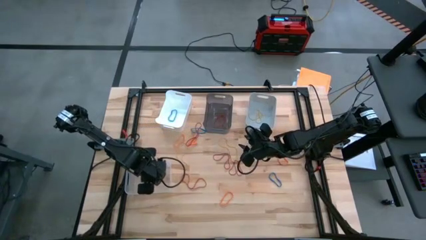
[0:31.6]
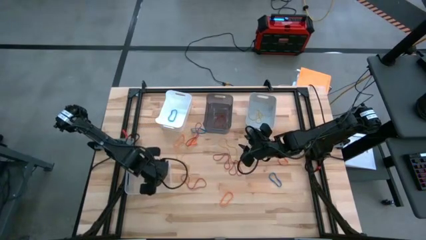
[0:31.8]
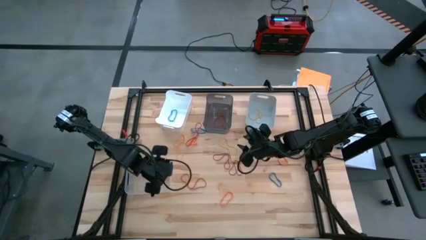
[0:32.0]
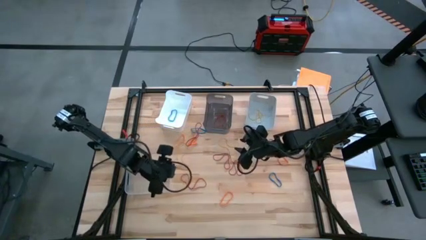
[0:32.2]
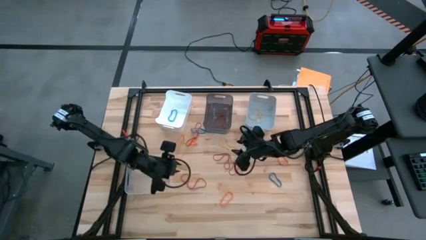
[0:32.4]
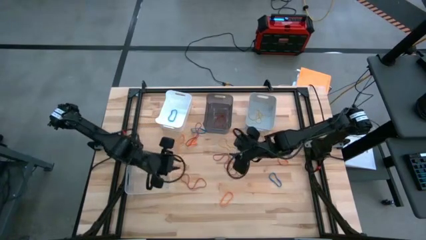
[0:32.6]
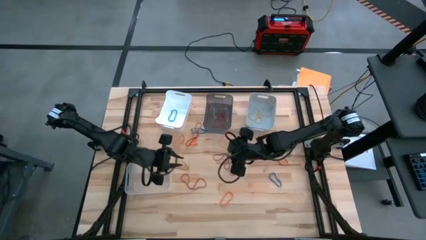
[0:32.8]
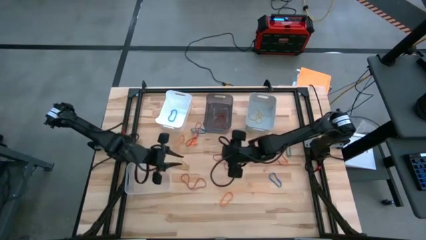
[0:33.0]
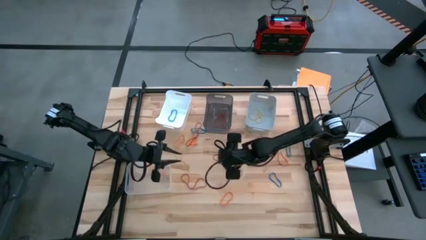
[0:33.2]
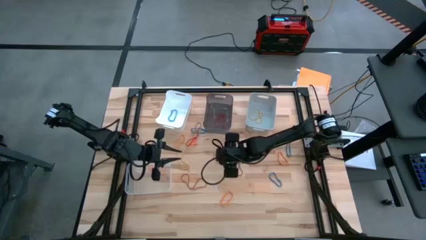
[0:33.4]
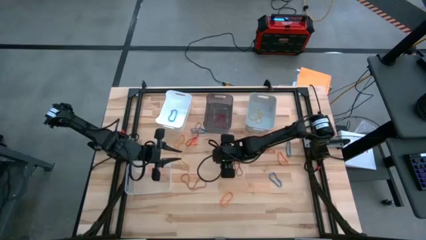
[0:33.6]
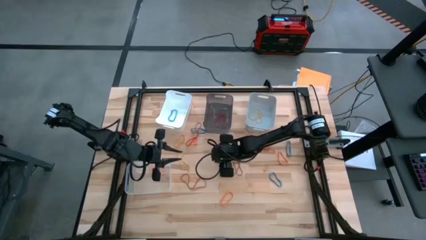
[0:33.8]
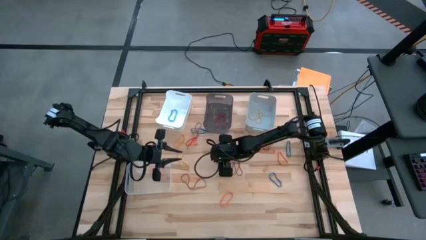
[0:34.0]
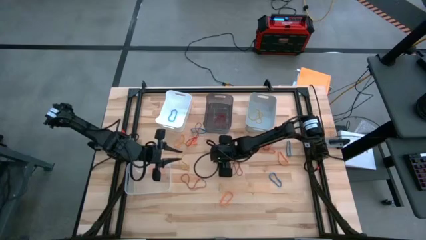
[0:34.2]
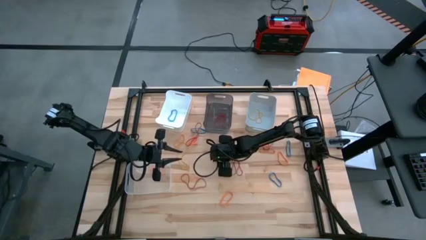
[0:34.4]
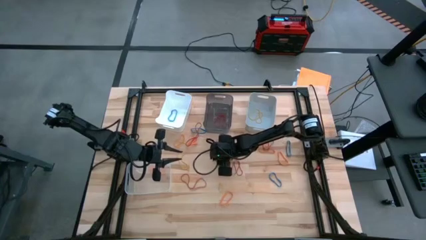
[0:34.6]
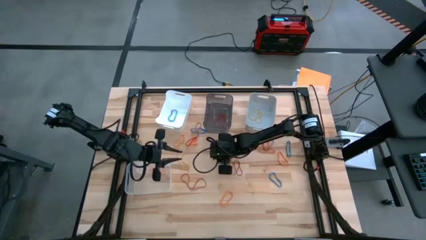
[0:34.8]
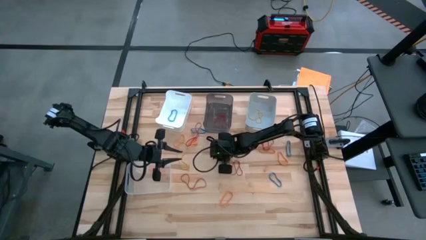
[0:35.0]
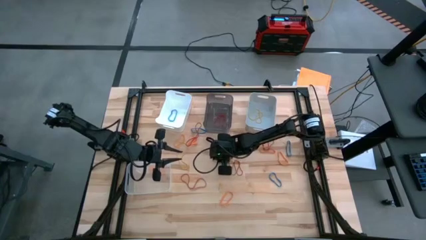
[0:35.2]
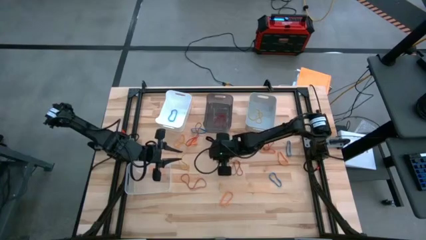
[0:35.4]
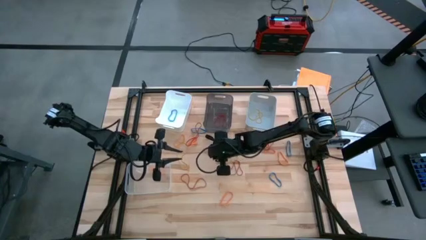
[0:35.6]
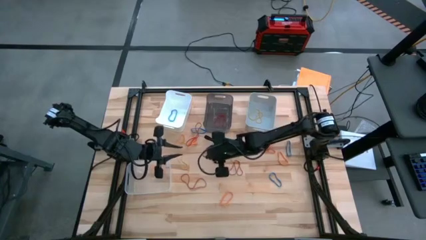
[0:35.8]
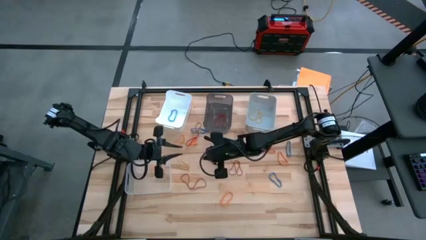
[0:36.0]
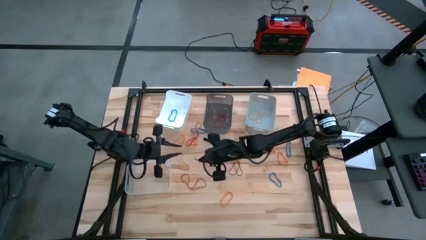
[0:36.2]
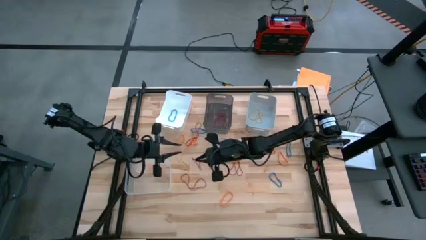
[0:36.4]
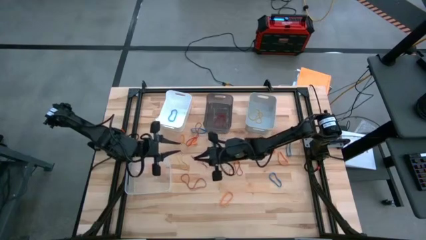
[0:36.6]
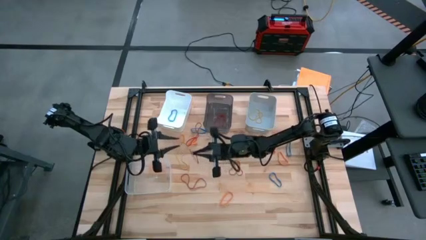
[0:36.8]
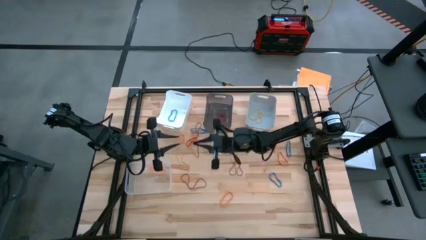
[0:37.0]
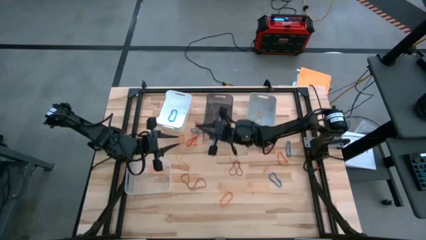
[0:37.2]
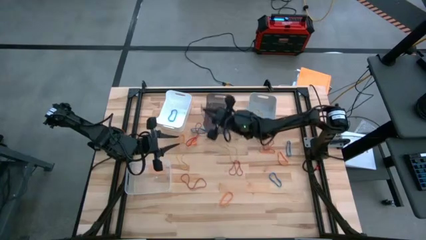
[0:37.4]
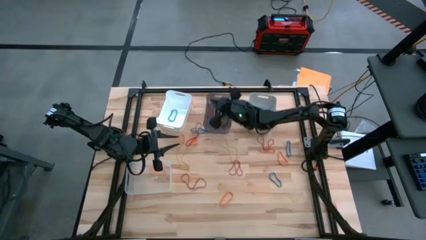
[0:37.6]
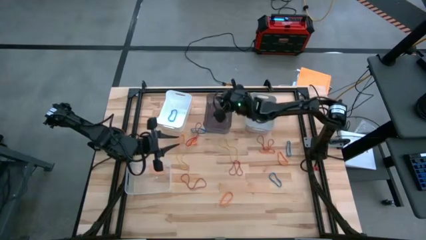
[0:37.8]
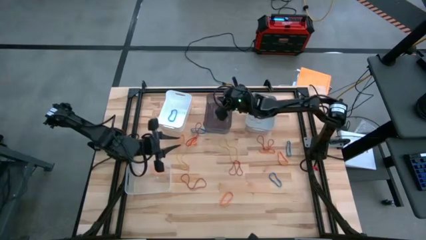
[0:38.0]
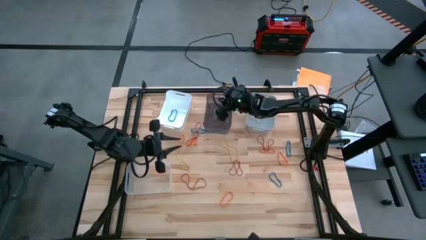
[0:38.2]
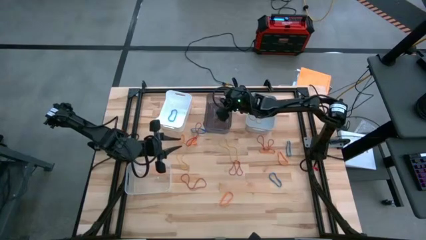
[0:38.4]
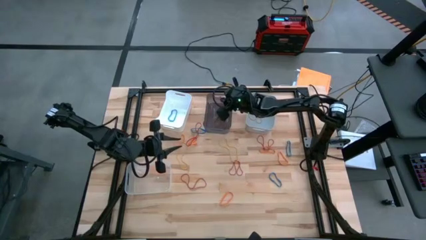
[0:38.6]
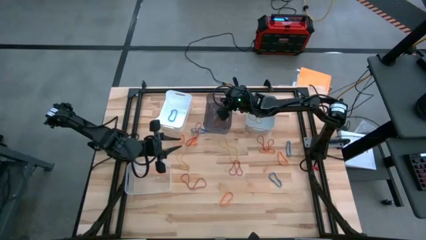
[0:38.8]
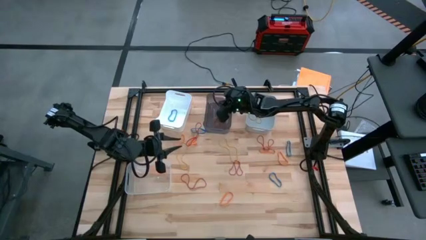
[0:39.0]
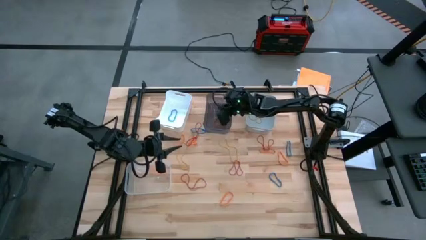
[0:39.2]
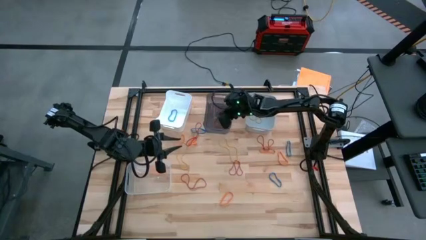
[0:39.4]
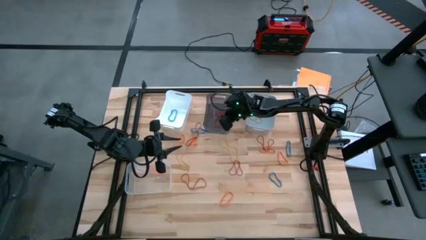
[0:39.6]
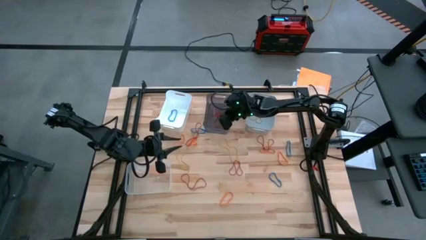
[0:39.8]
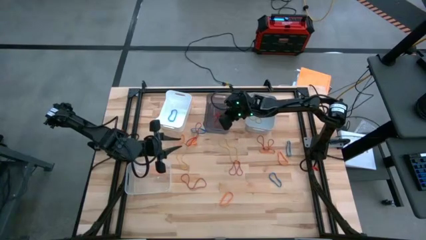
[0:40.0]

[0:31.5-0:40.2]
Task: Sort rubber bands into baskets
Put the red rubber band into the black bin

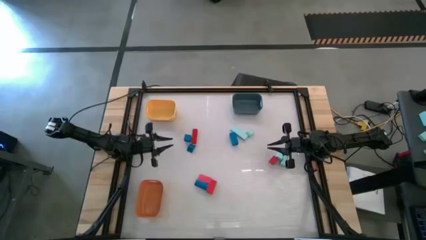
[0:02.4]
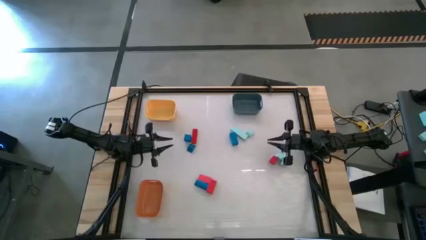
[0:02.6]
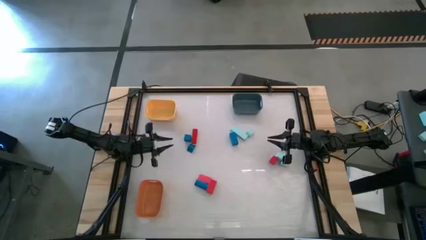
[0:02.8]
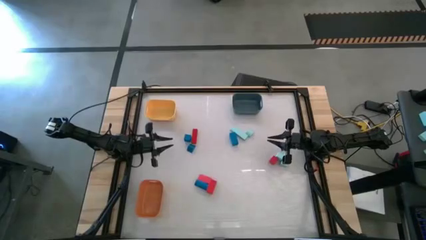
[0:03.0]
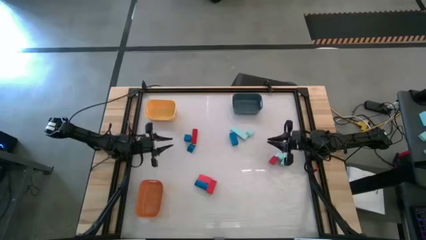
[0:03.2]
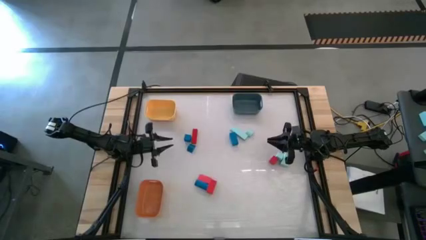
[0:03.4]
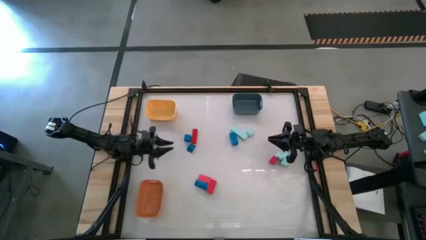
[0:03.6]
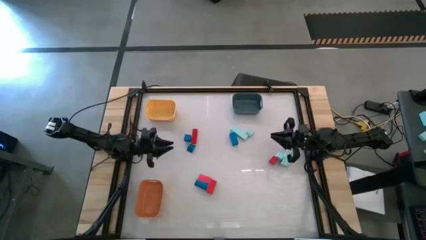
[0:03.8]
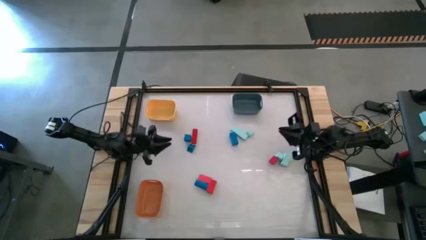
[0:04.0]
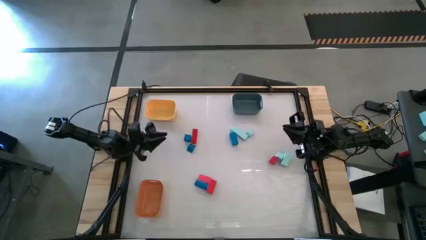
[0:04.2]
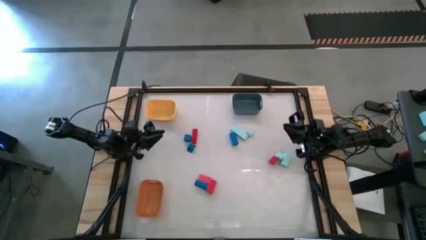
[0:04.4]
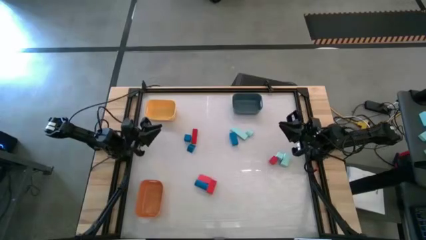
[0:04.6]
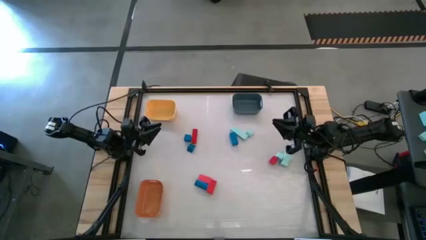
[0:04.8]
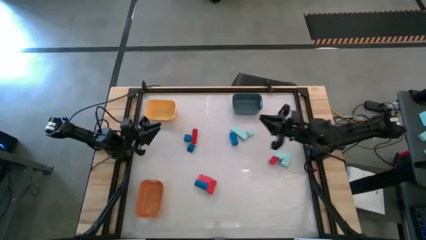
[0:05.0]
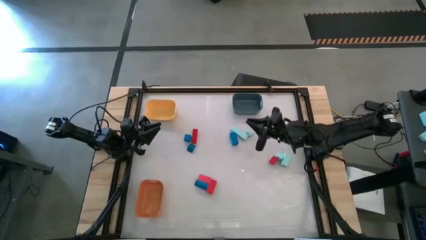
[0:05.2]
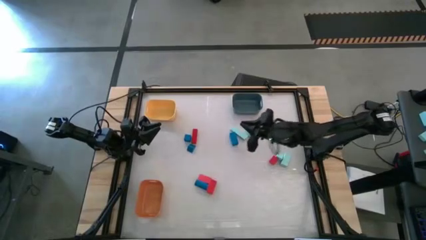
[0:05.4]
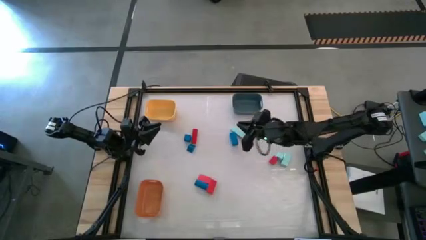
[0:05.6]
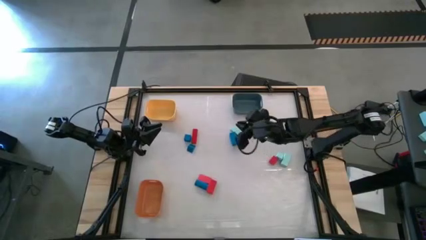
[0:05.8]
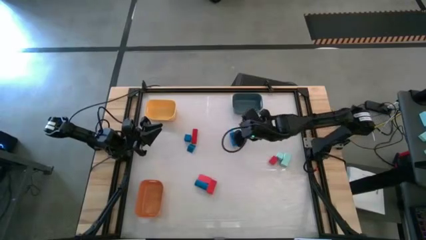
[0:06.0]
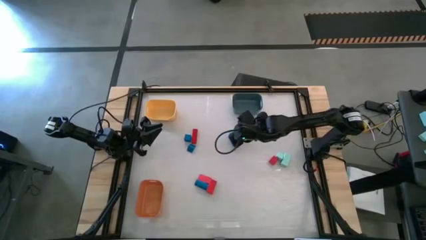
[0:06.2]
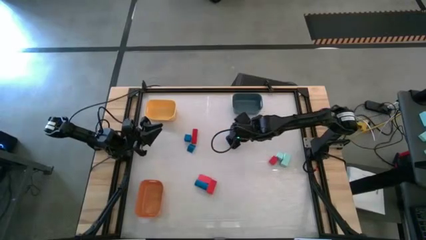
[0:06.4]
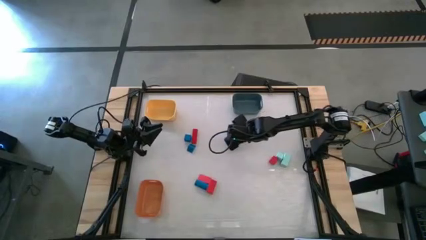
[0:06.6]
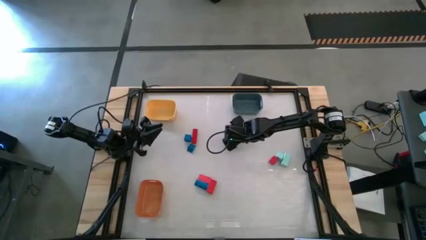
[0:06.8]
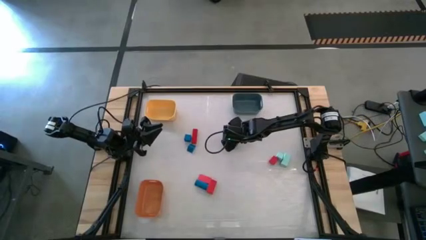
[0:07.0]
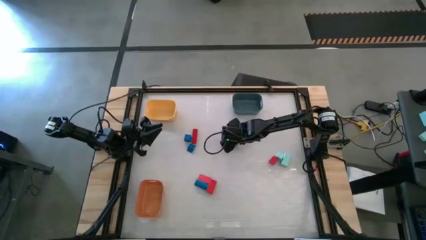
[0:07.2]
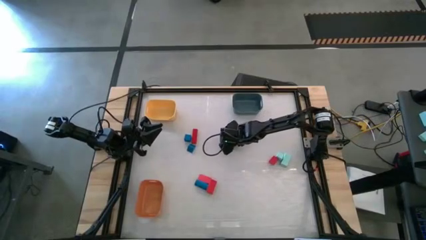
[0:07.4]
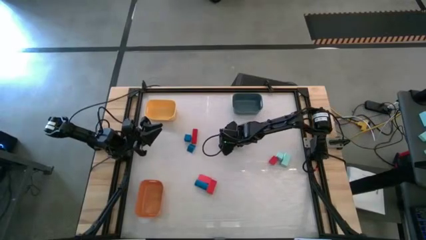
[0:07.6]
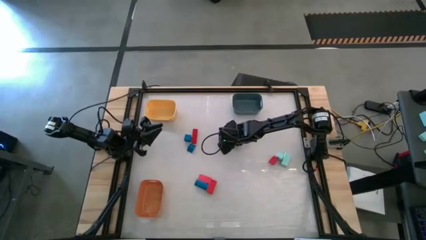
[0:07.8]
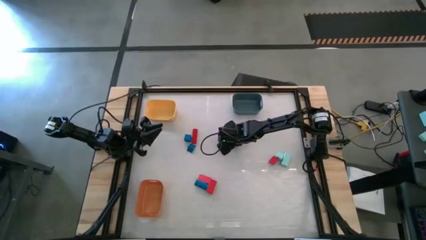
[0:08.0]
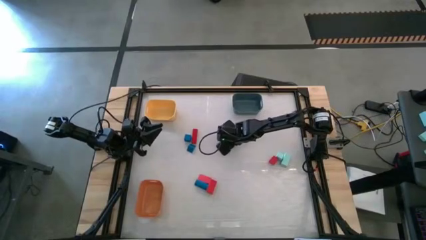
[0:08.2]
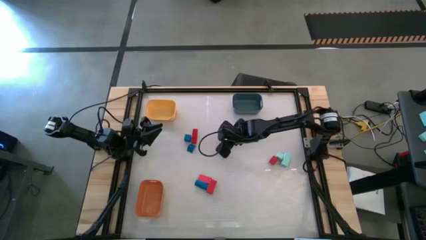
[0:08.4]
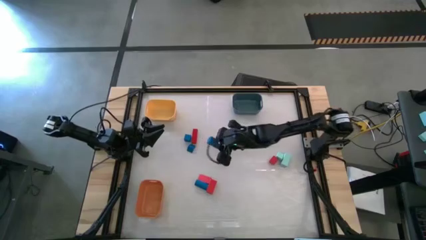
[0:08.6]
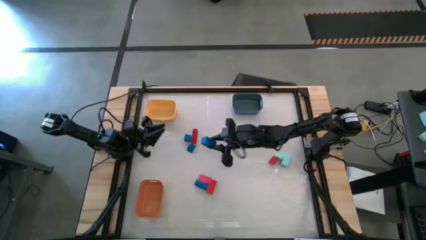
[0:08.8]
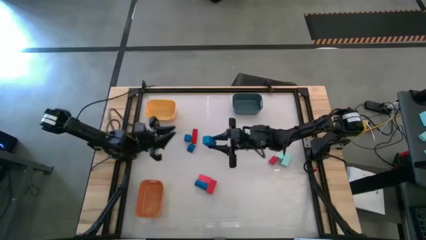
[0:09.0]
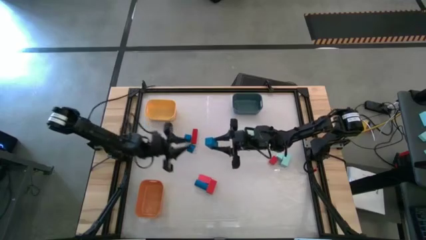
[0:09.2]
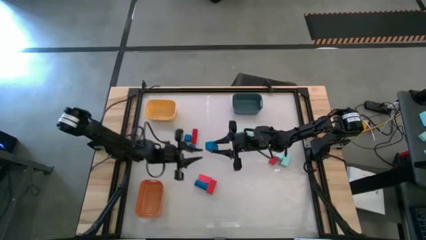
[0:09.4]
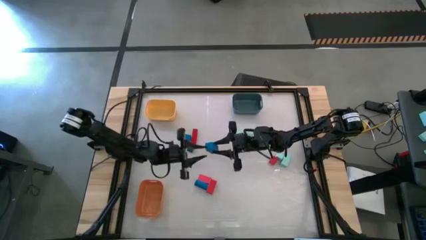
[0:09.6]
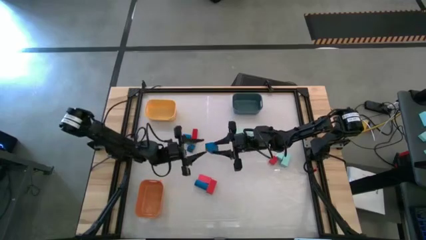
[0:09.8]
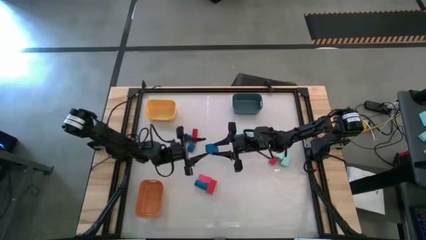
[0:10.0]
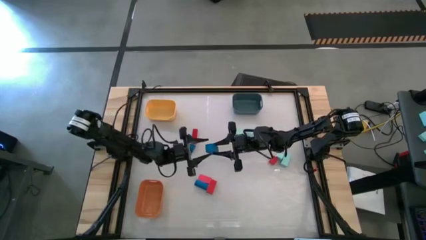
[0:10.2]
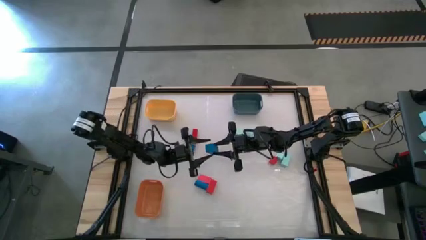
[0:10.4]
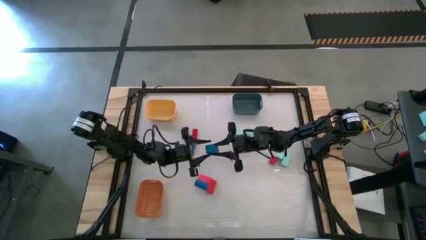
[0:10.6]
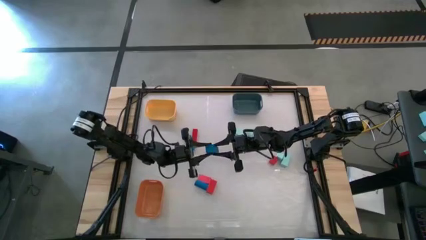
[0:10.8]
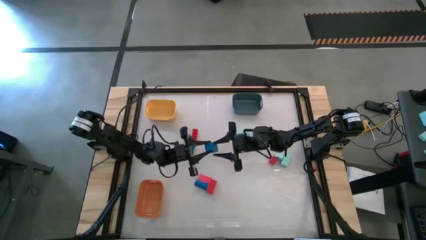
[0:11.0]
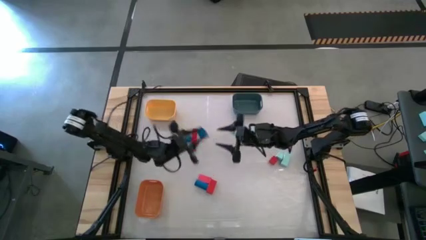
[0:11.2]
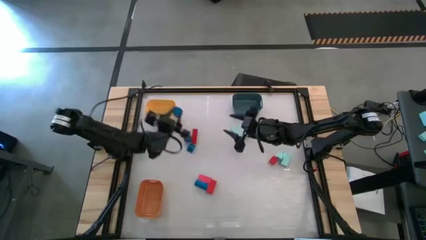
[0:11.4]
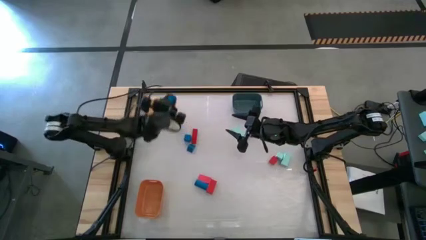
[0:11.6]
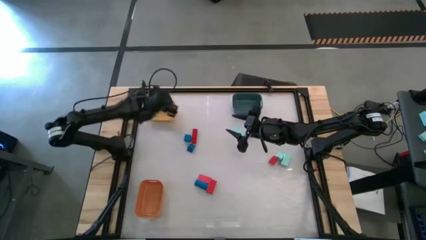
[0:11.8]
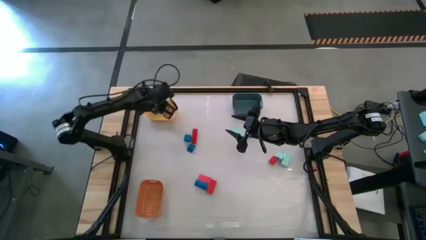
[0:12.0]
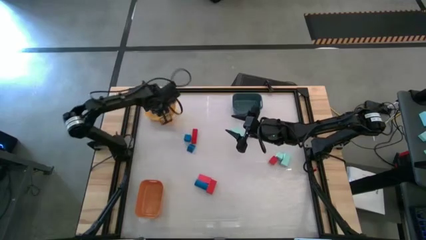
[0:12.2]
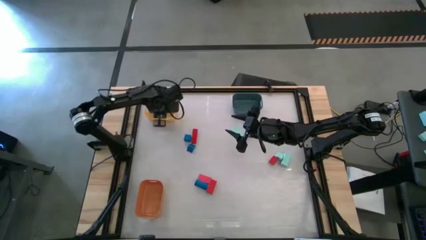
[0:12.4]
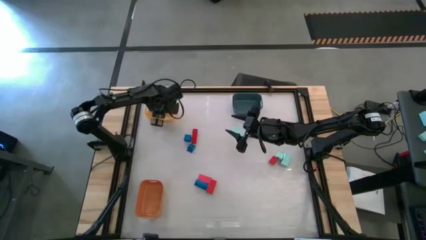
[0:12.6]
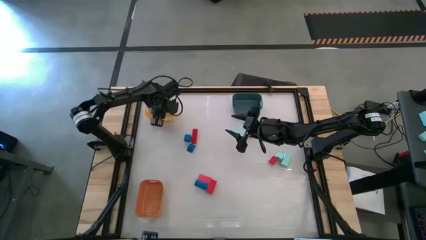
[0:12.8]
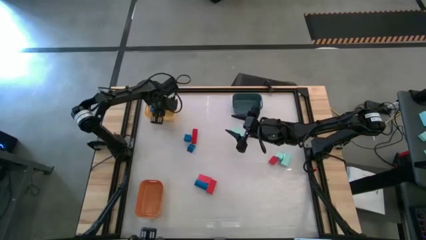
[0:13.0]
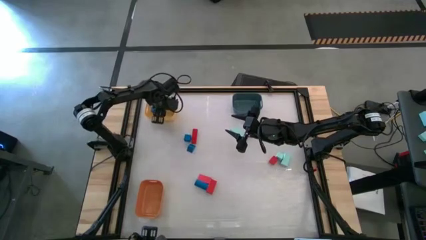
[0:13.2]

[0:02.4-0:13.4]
Task: Sort & place blocks by color
Put the top right blue block into the yellow bin
